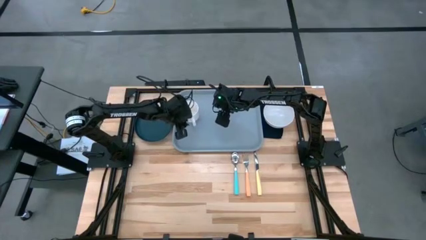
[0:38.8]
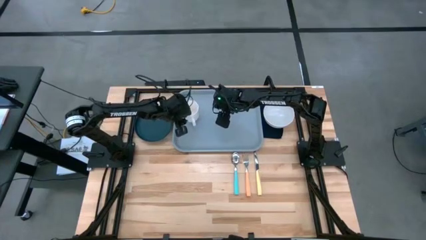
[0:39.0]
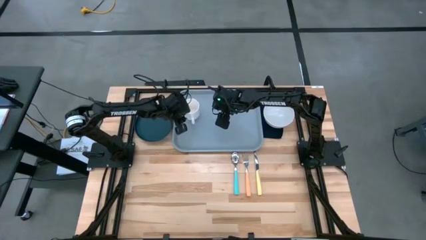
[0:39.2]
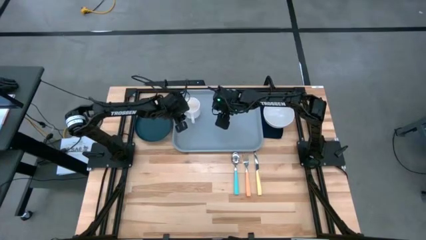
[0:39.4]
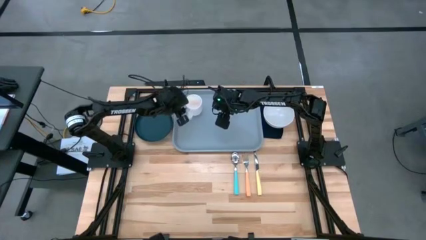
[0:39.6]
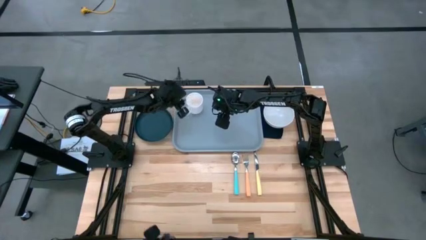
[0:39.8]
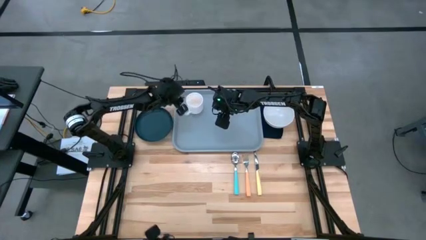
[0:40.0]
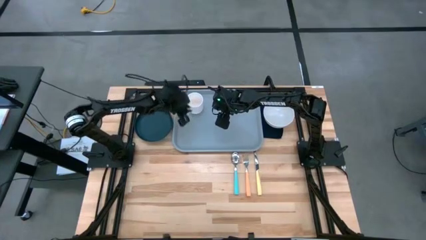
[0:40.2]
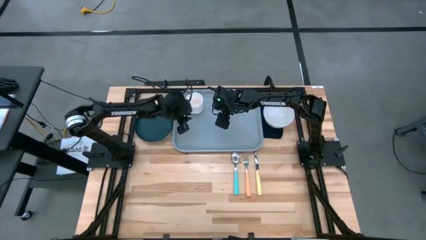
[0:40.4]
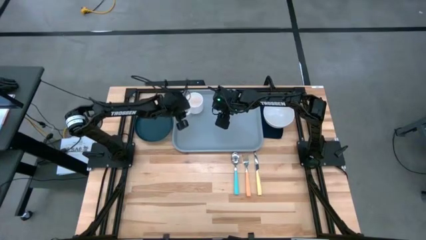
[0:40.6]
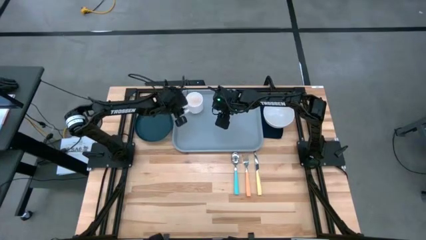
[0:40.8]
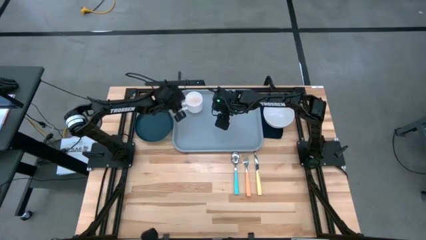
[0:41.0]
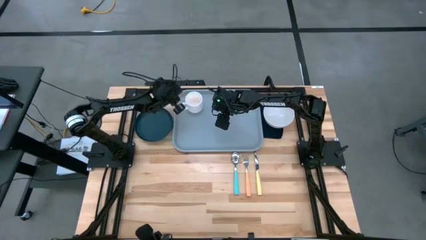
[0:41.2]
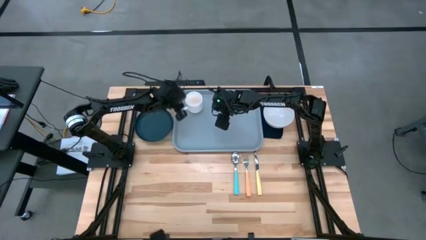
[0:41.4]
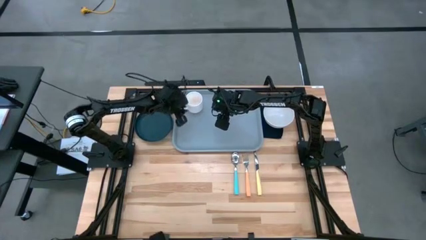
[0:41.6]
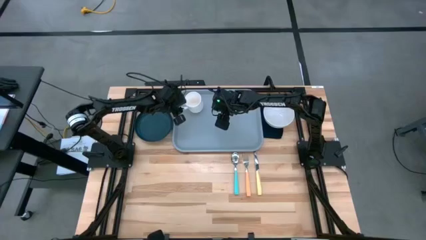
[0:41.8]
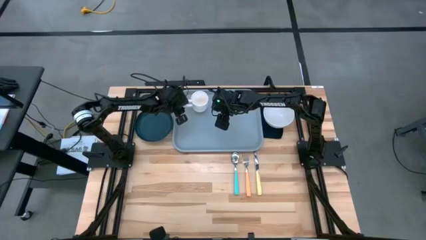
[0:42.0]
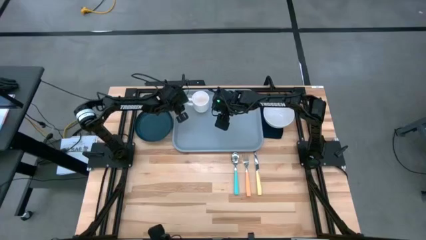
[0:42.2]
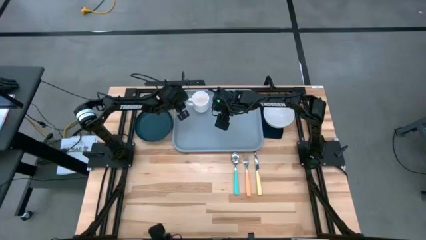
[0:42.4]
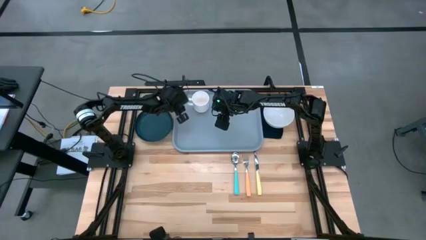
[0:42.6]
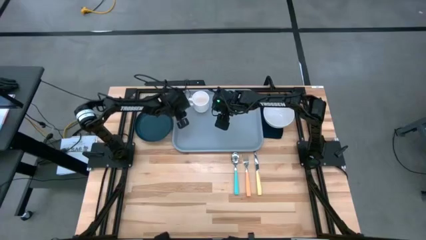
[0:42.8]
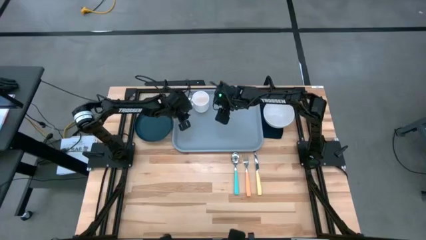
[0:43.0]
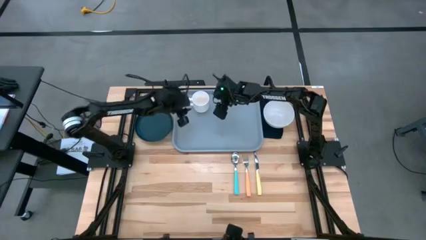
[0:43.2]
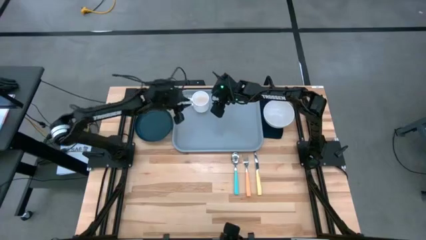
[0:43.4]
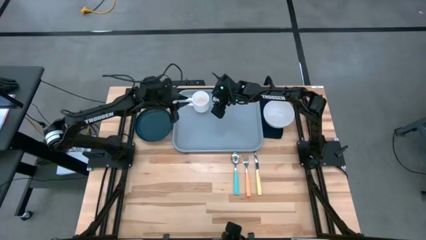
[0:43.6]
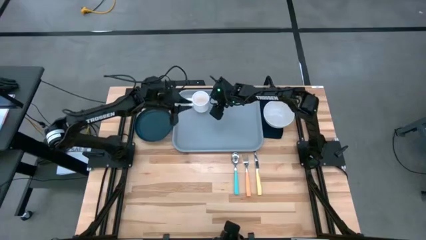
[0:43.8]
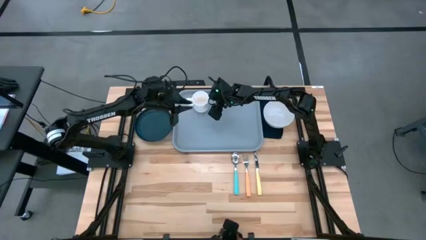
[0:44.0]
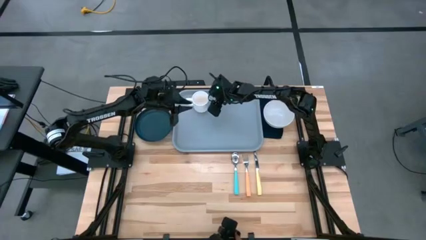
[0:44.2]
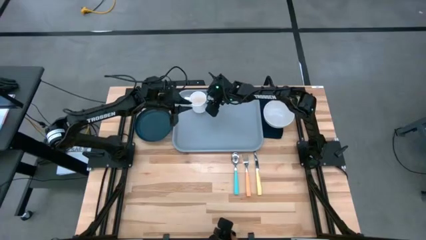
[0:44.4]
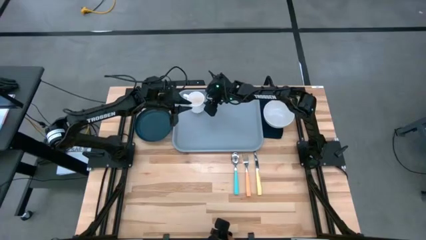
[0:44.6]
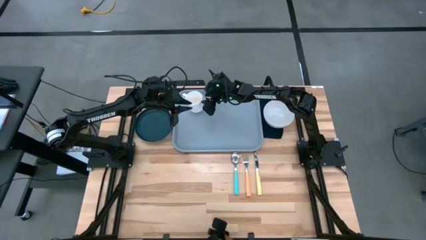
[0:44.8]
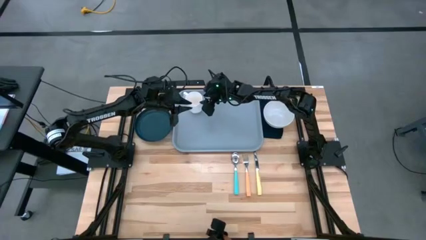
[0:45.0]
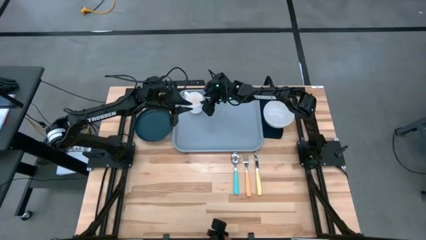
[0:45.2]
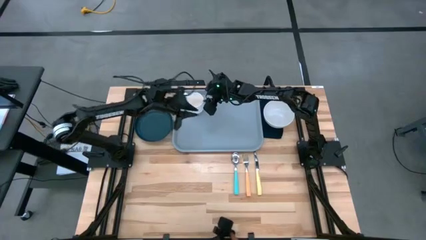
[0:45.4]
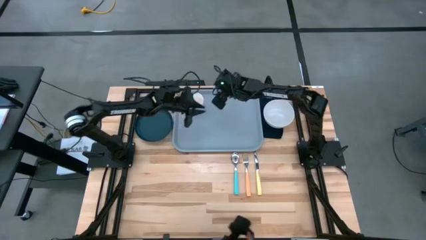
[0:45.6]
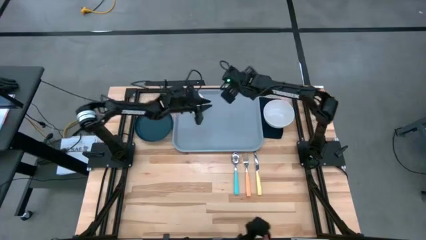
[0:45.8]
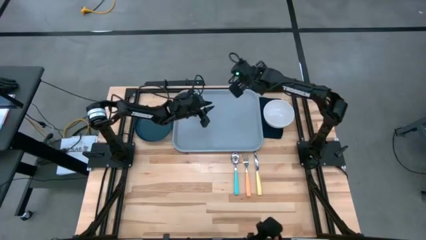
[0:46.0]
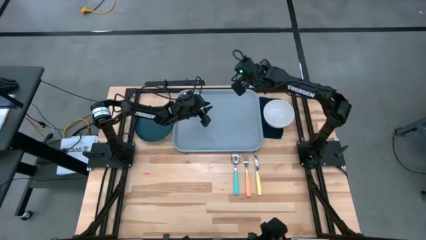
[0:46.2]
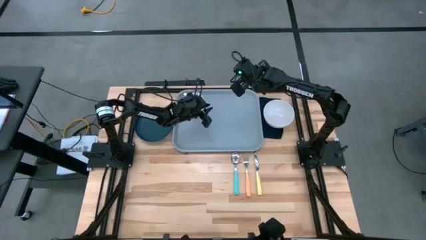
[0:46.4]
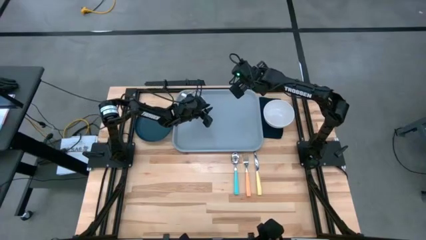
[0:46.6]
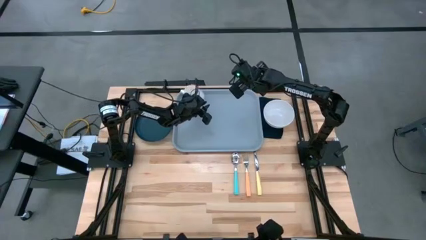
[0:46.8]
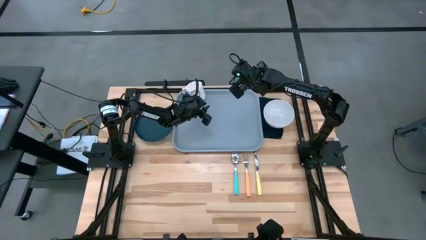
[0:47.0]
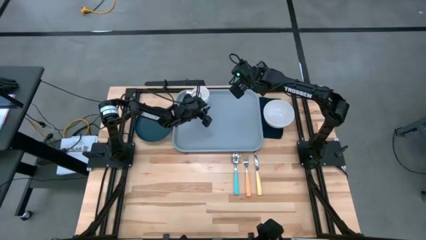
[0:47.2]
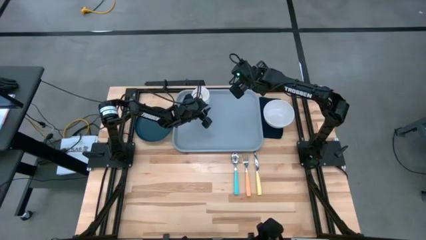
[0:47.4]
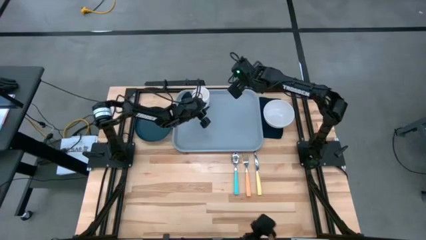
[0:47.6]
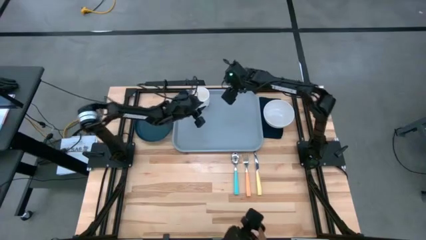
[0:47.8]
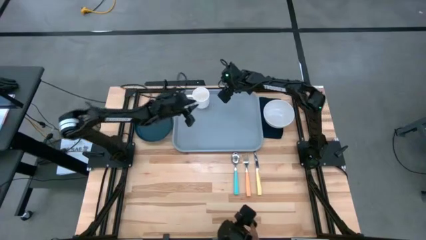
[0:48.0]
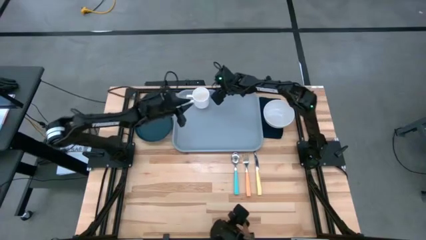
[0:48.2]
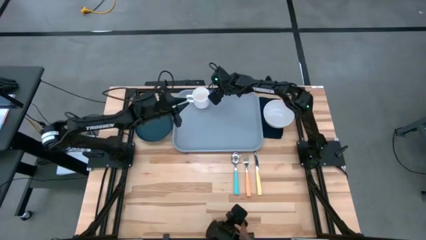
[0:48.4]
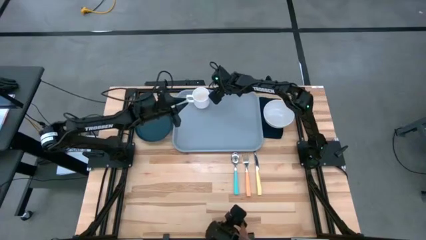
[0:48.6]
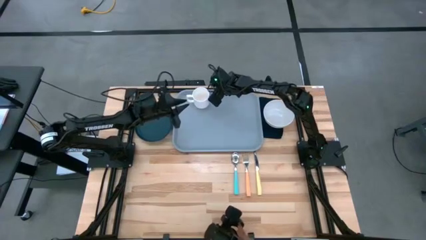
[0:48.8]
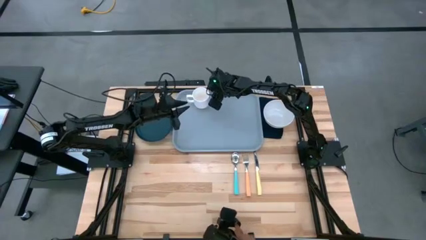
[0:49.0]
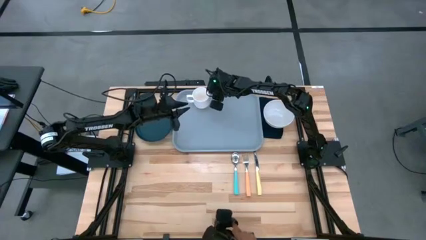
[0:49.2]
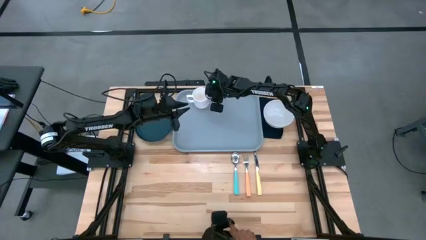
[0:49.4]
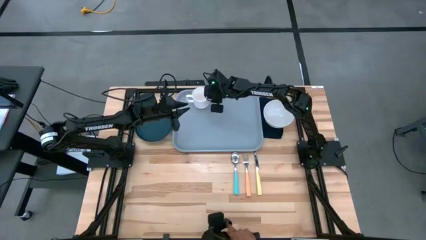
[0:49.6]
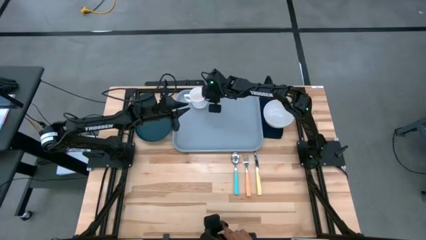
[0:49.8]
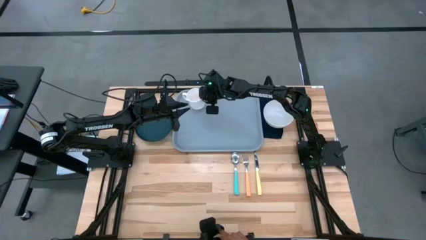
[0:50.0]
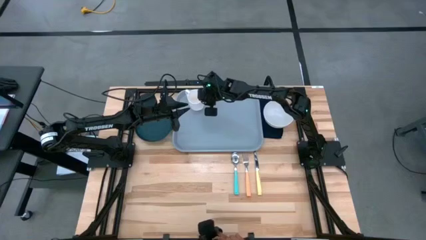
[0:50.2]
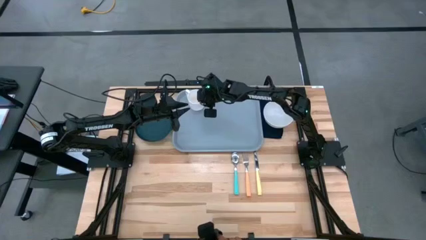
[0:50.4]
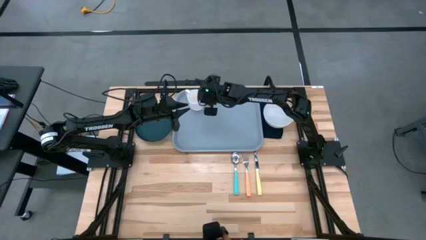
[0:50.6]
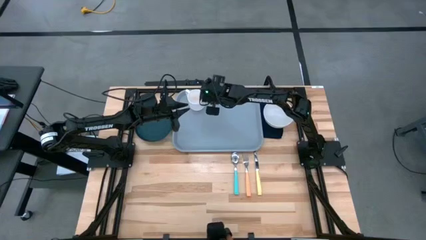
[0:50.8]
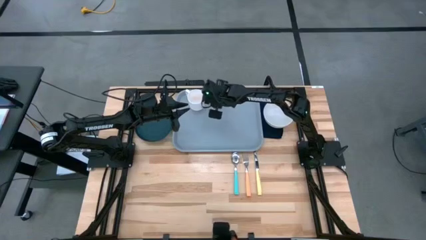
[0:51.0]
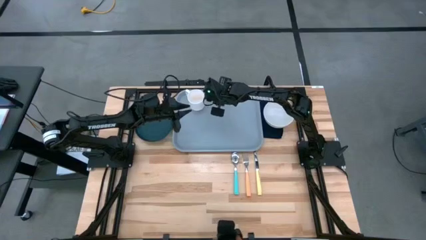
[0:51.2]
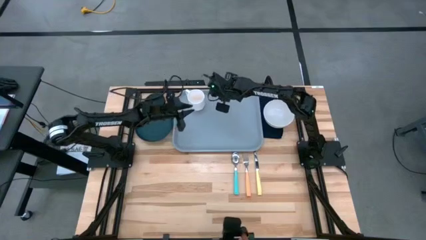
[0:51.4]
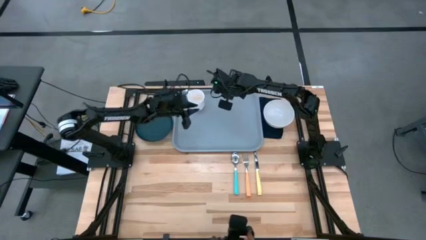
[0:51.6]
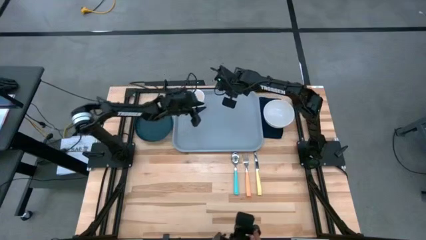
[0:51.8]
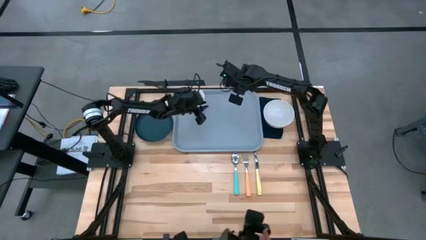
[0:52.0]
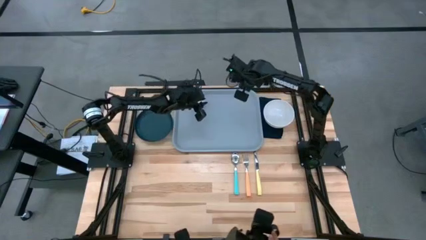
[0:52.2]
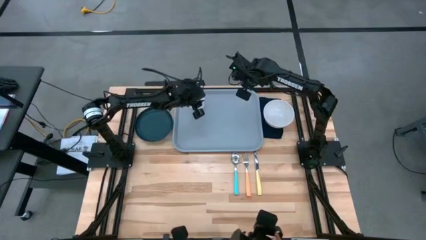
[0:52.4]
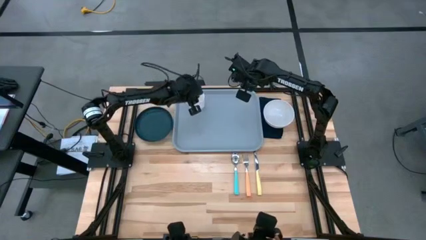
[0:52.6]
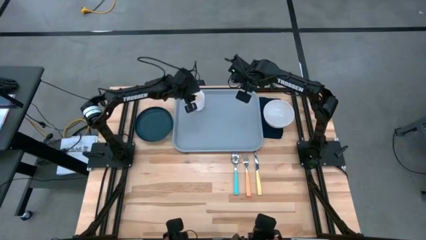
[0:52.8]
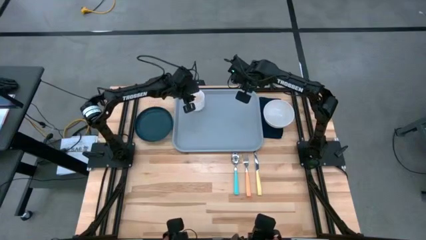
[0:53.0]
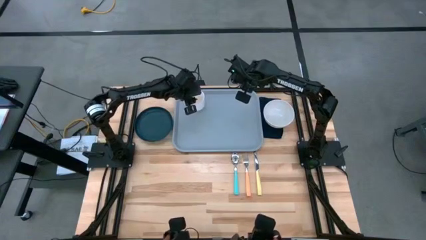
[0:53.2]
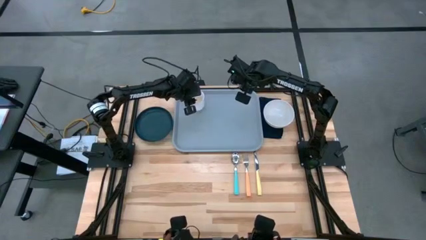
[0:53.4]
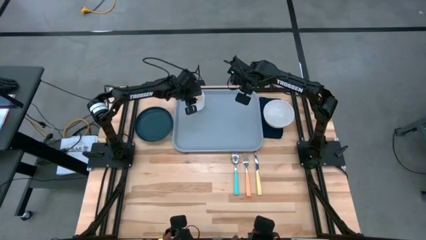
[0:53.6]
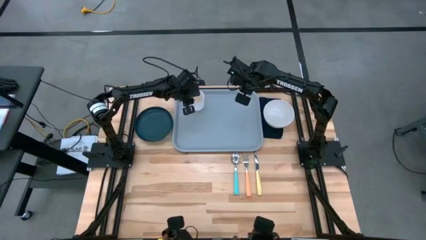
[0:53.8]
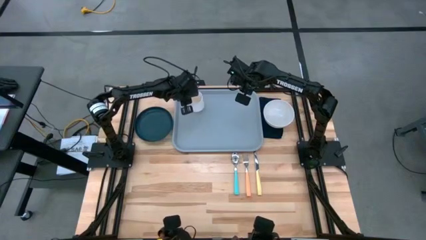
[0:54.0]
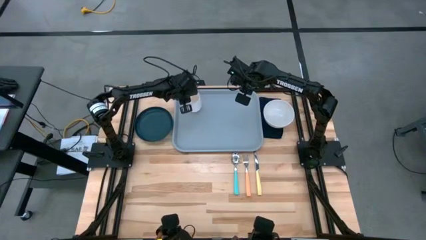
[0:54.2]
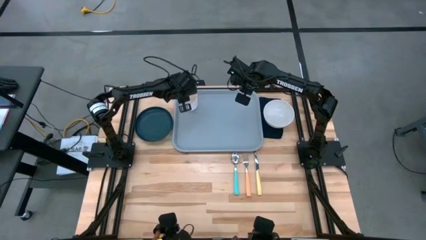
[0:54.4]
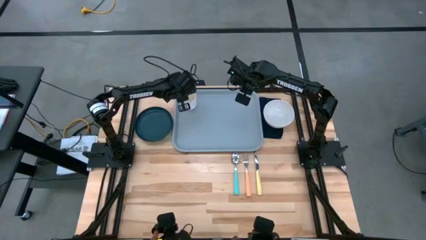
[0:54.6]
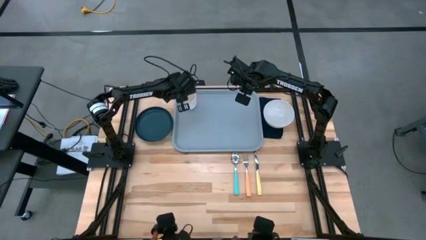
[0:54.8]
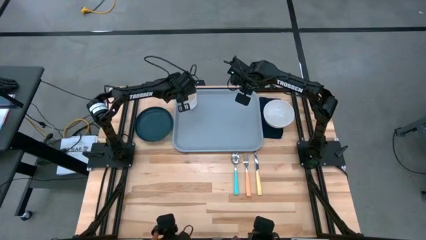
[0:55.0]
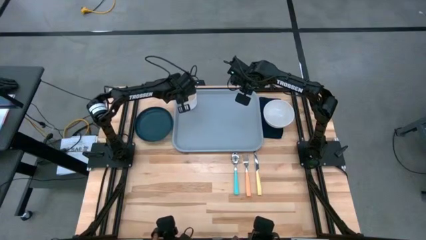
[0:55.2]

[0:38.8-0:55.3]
Task: Set up tray
Put the white mug on the gray tray
